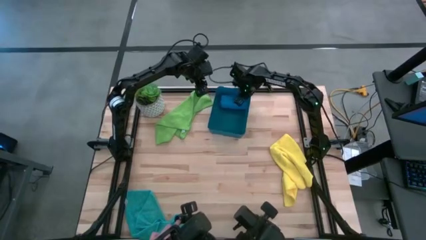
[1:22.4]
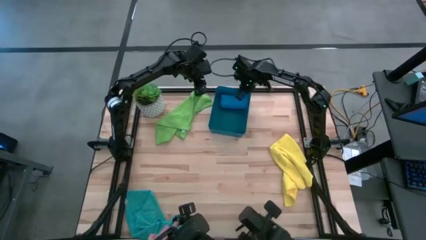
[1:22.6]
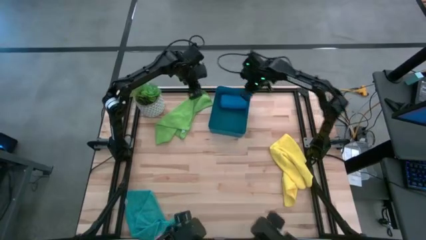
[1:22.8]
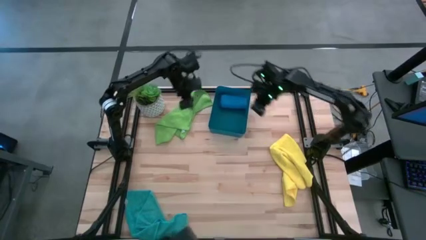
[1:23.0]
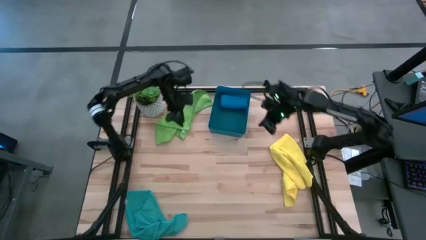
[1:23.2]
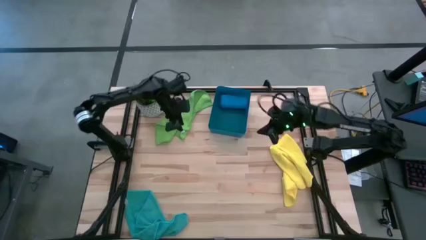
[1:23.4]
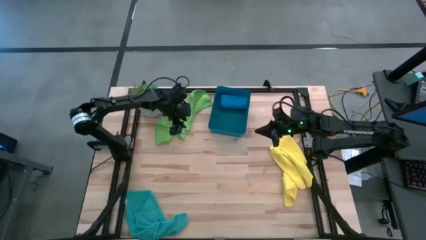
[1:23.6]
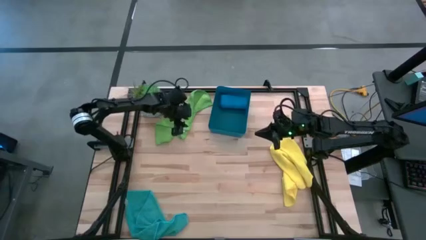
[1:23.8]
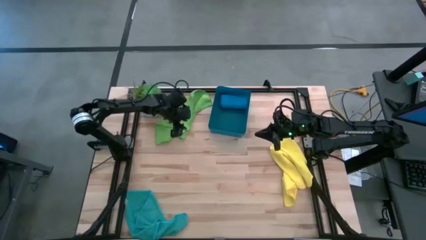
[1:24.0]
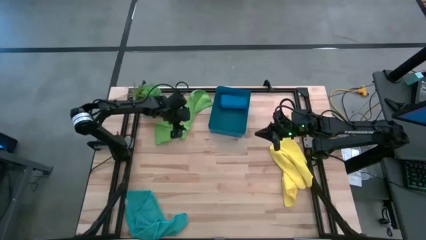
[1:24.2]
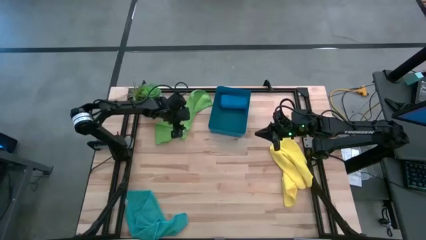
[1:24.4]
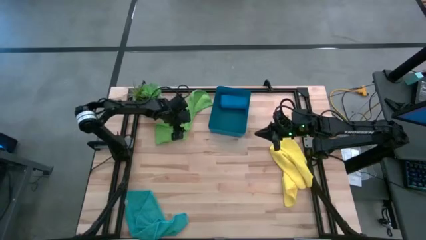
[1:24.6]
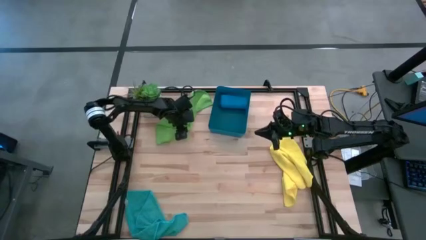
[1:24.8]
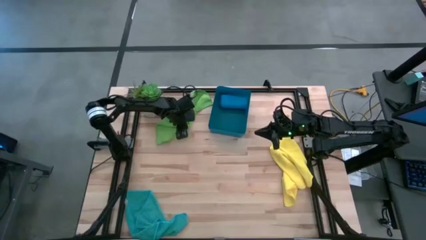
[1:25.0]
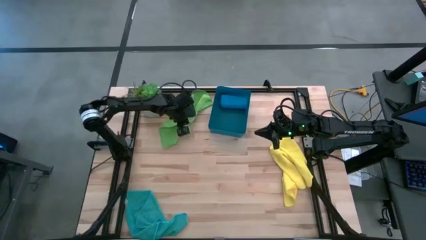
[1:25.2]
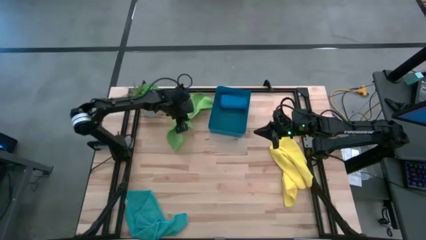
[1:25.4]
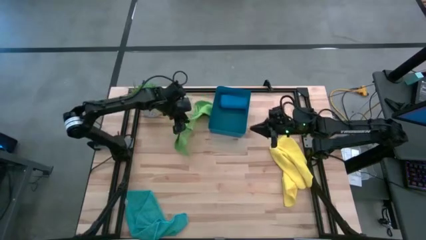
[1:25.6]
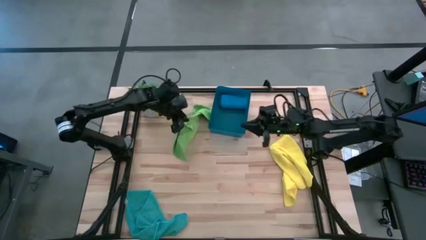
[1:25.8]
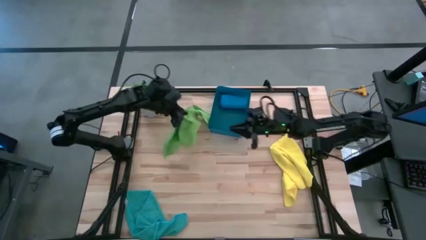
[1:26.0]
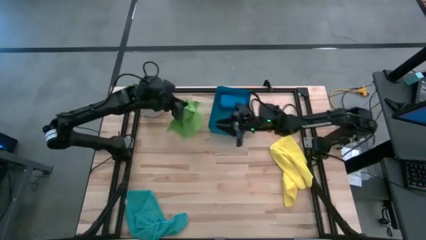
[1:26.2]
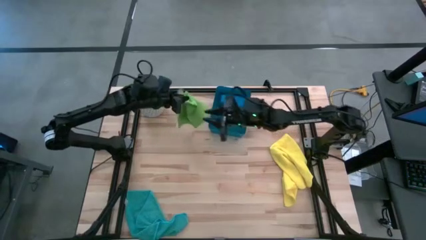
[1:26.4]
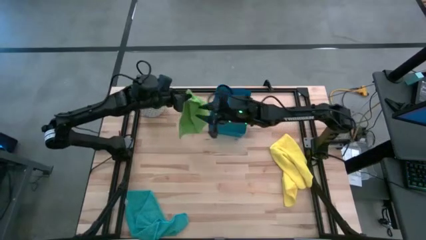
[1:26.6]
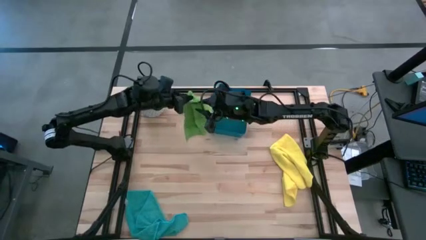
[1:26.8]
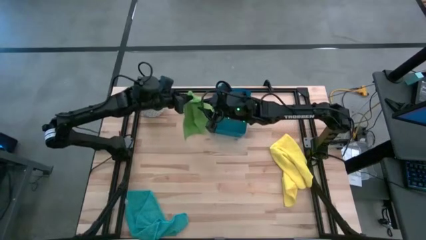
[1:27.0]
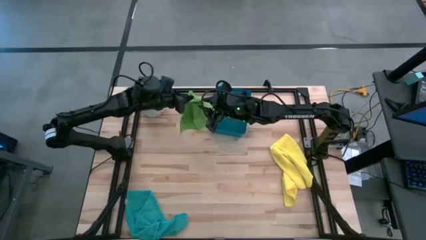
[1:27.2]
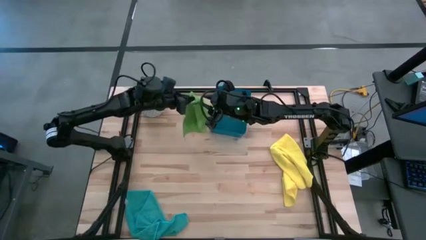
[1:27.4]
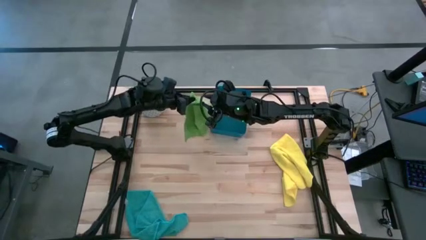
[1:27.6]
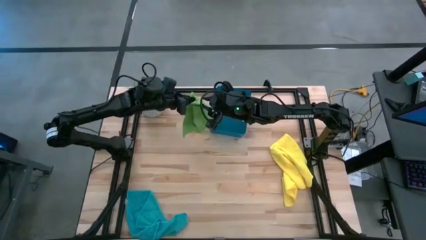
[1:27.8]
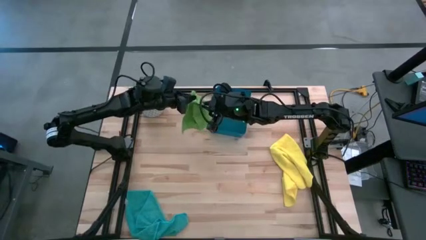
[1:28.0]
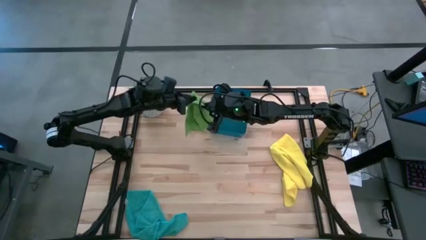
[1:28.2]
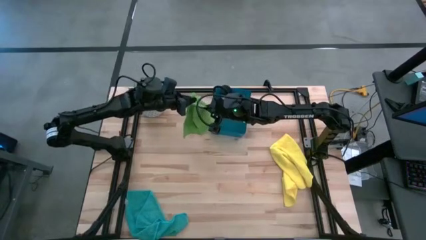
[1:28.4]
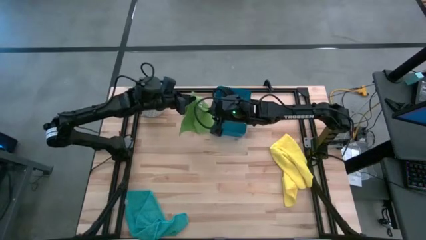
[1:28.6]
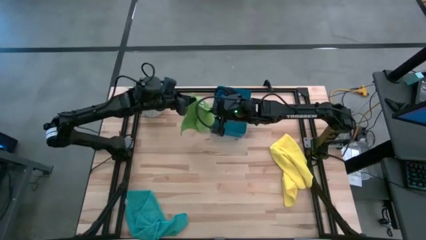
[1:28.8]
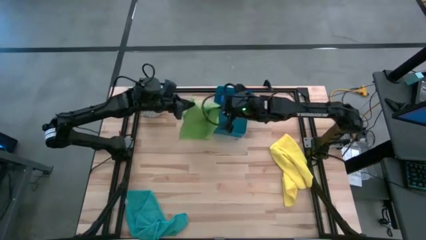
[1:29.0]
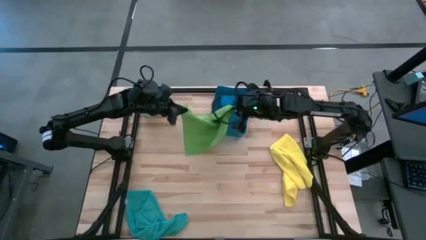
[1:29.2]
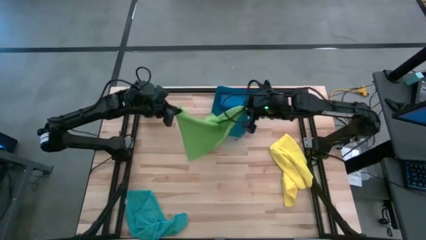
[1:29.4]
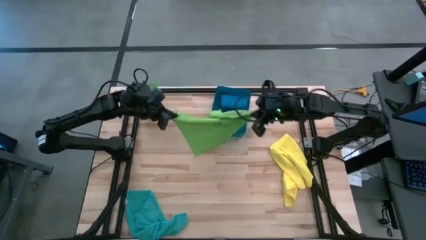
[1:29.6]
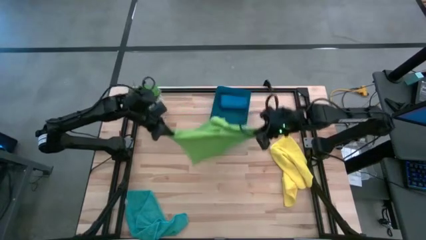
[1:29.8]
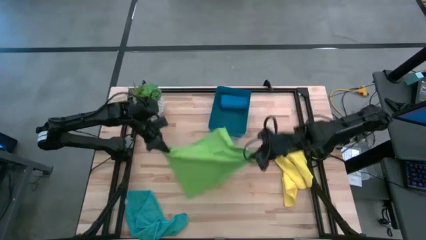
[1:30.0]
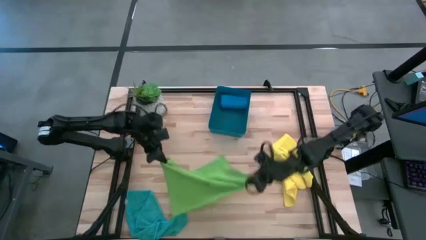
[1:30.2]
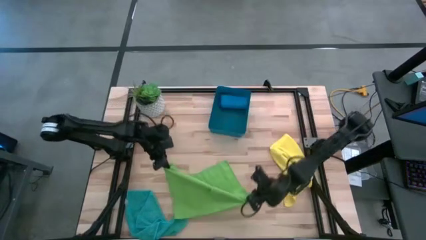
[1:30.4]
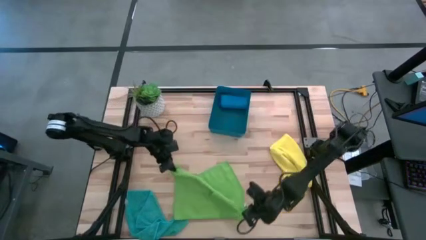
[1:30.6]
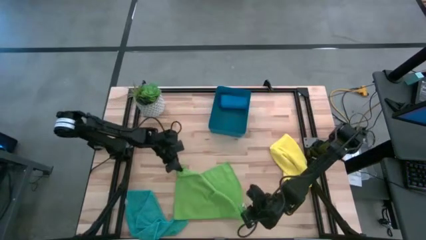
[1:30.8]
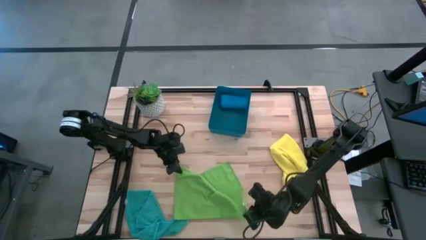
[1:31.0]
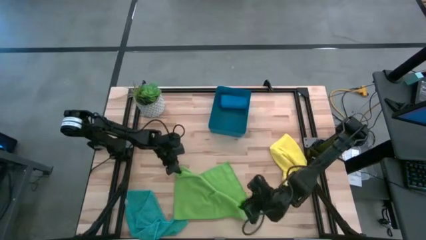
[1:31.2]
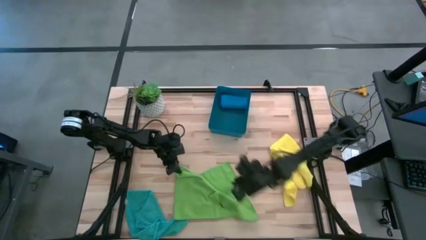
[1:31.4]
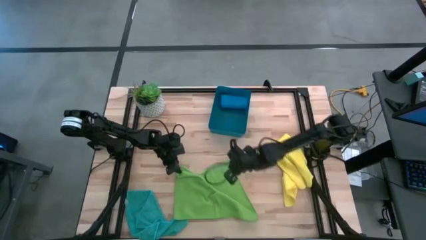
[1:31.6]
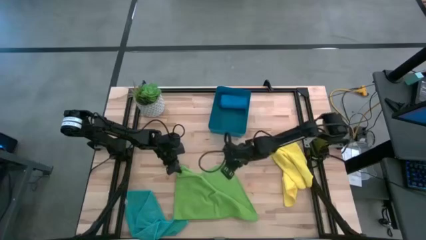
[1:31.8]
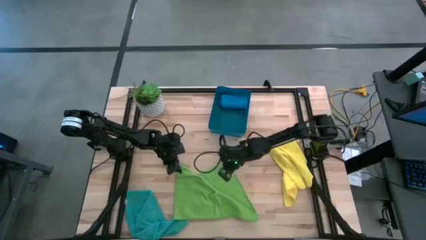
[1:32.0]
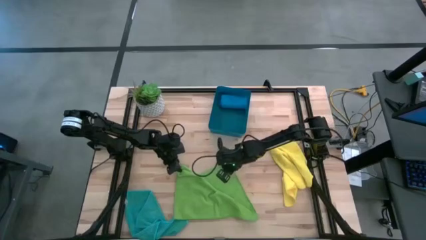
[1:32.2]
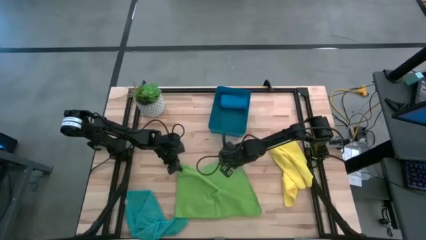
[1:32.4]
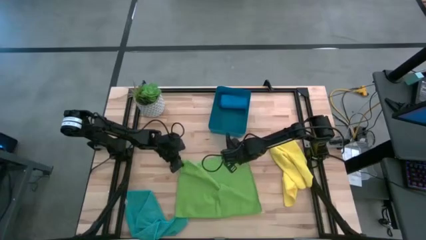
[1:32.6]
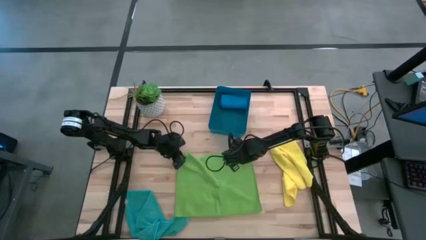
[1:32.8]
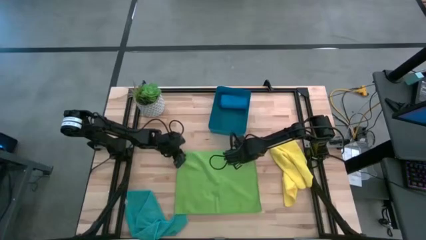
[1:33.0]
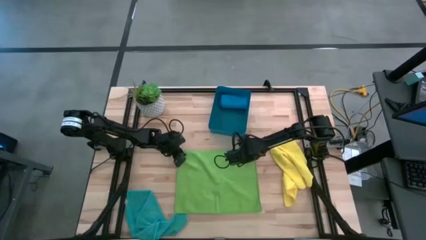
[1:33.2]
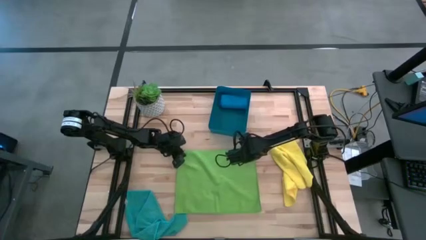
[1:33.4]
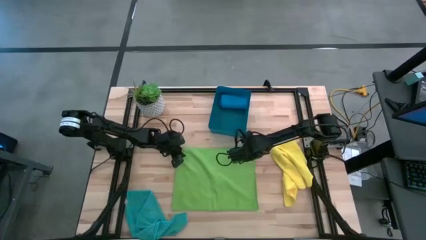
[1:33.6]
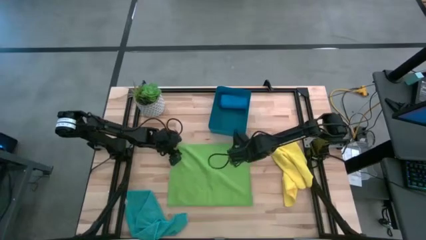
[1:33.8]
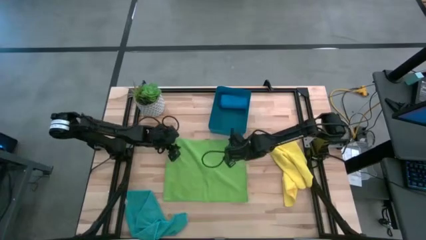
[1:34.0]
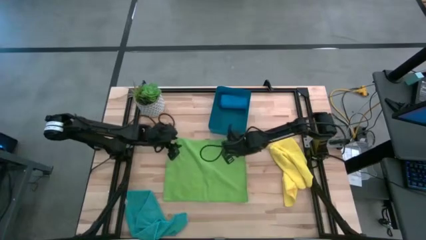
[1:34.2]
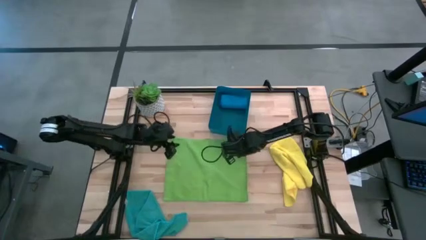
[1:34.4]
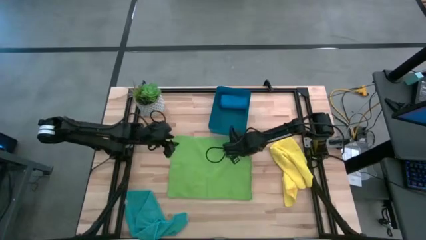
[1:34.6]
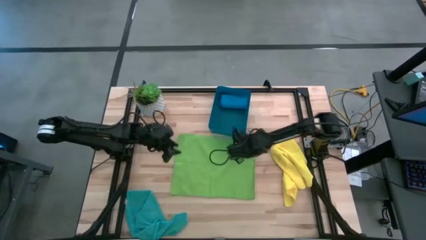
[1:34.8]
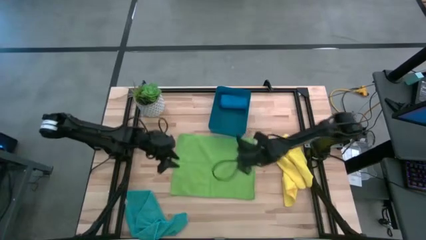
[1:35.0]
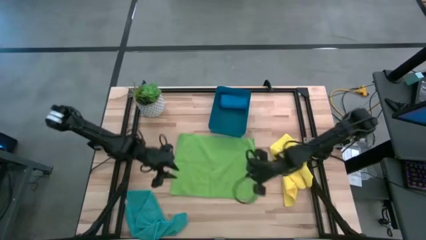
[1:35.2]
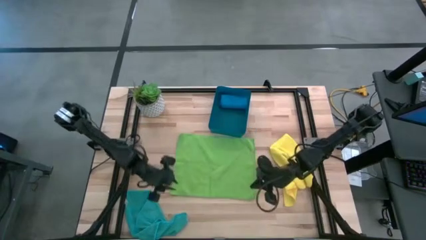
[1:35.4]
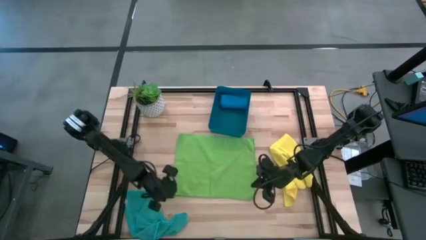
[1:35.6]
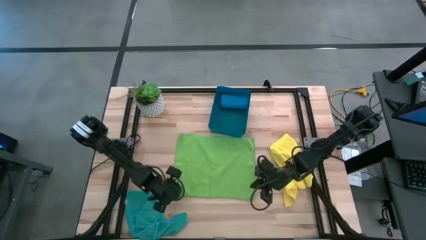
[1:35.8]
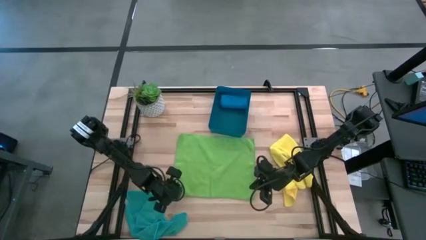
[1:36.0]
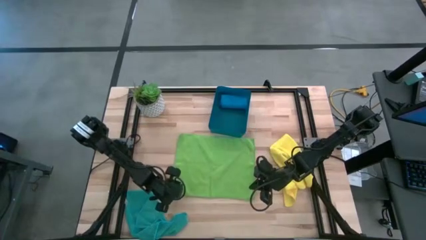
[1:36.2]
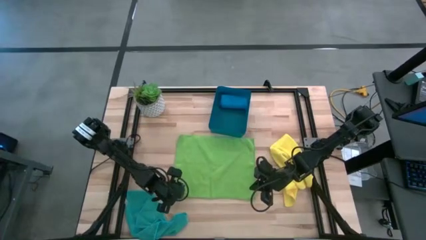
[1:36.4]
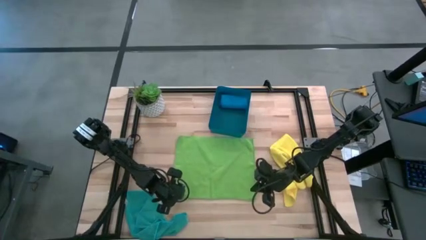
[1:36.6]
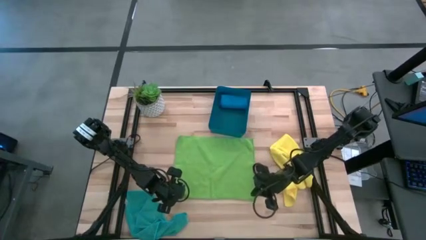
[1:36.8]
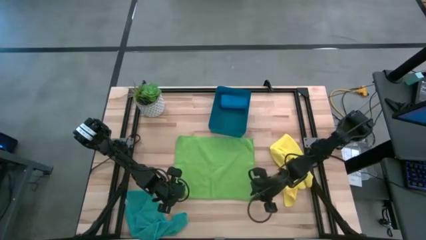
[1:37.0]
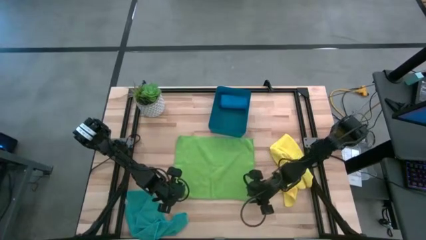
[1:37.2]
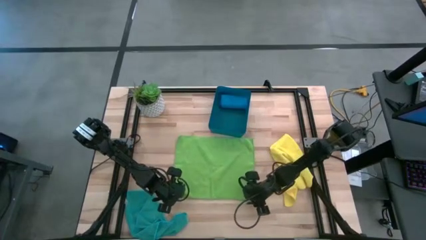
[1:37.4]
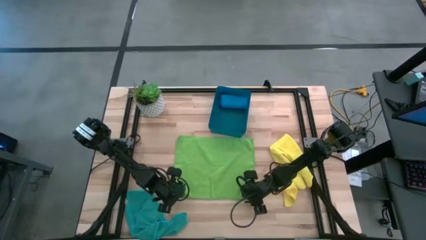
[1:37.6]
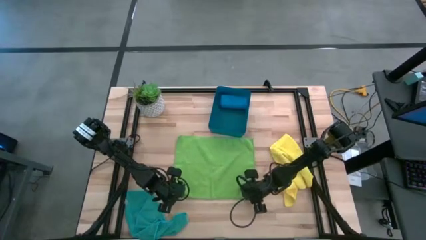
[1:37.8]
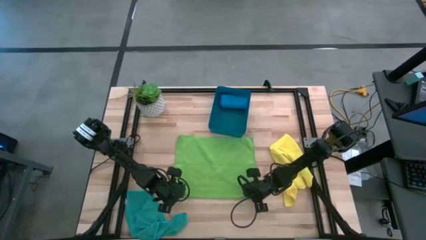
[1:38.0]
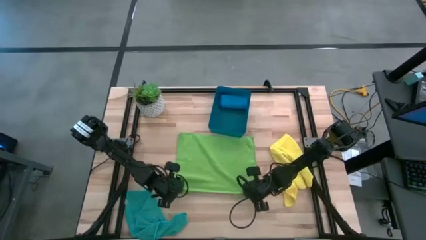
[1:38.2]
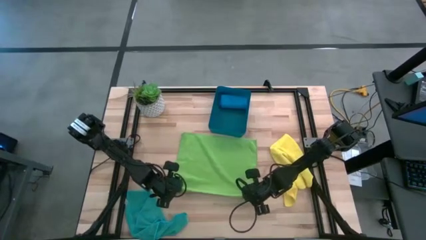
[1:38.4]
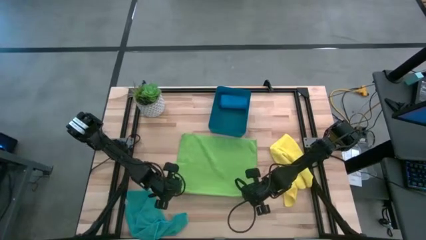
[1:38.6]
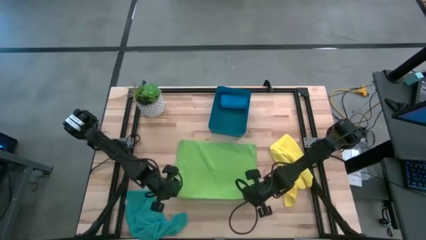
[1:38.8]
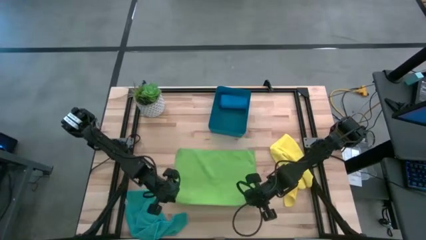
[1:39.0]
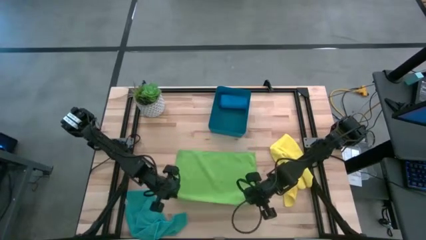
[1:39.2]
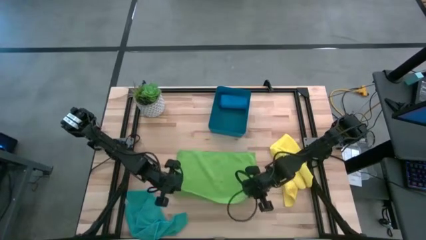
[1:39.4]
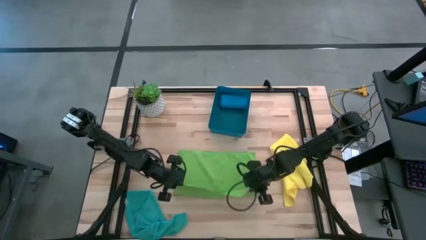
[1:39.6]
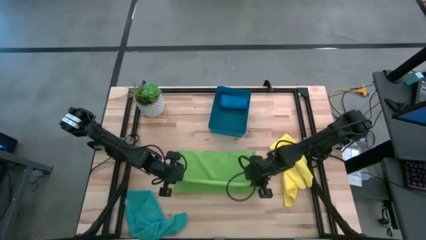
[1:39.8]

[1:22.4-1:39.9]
Task: Fold microfiber towels
Fold the green microfiber cloth
